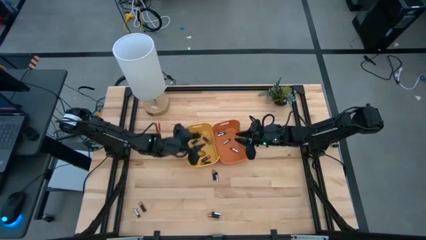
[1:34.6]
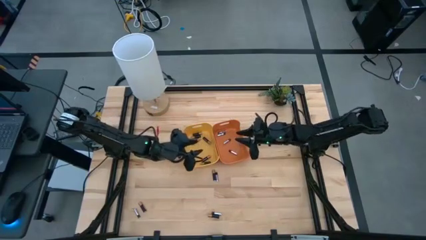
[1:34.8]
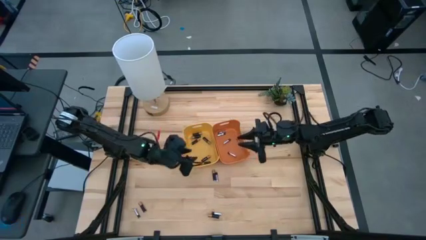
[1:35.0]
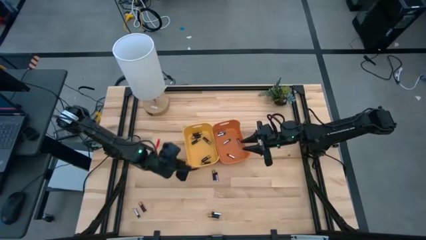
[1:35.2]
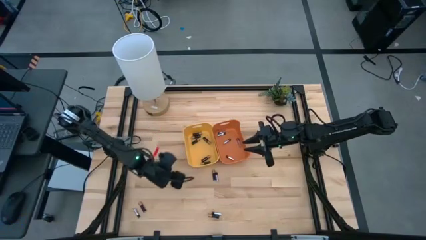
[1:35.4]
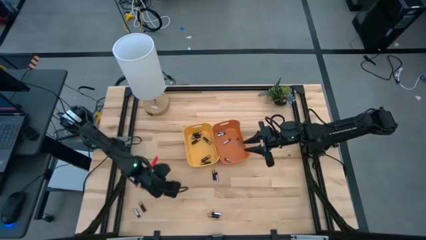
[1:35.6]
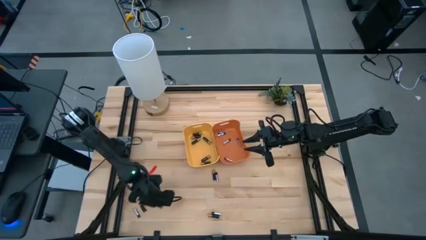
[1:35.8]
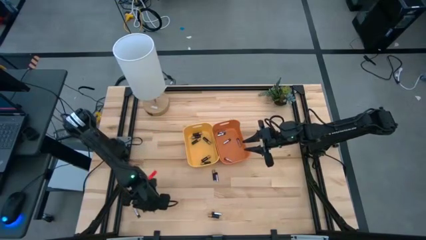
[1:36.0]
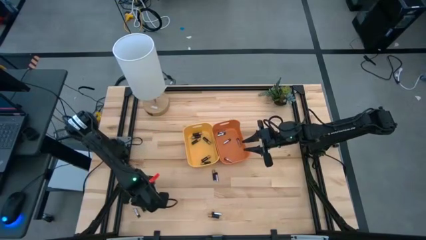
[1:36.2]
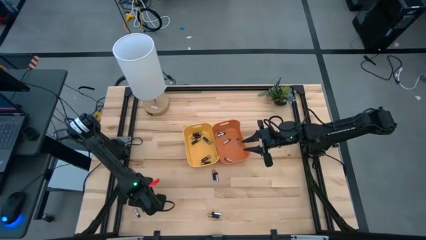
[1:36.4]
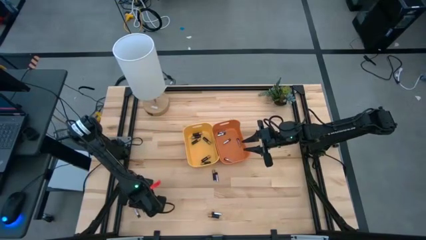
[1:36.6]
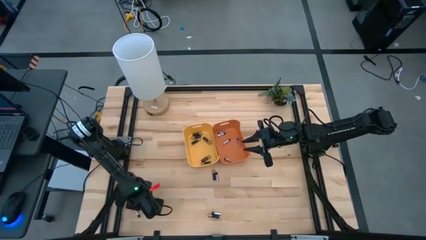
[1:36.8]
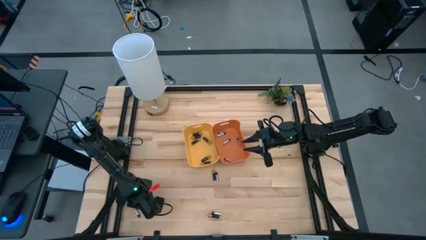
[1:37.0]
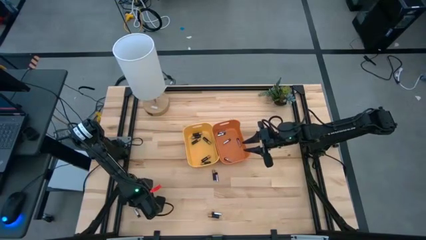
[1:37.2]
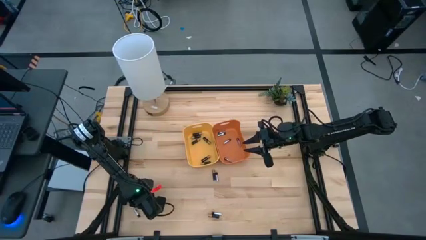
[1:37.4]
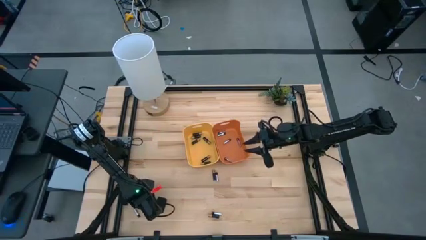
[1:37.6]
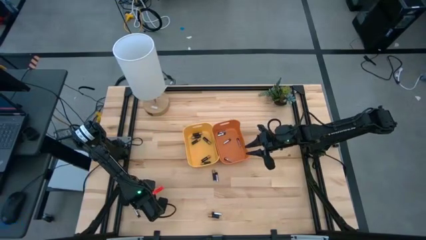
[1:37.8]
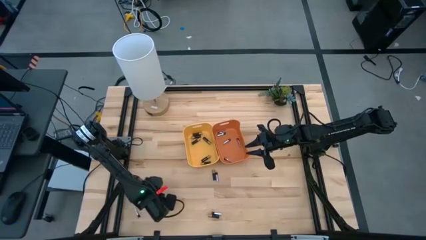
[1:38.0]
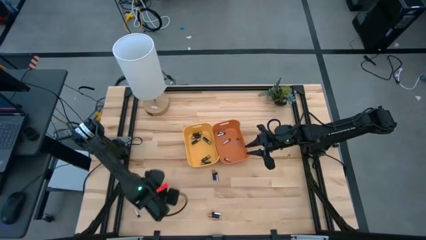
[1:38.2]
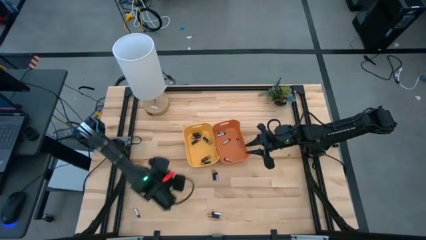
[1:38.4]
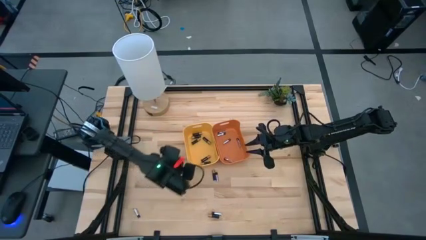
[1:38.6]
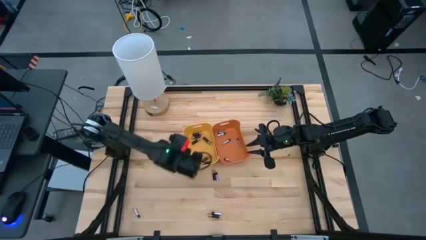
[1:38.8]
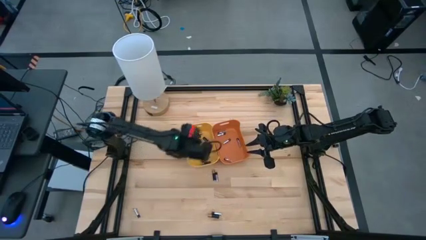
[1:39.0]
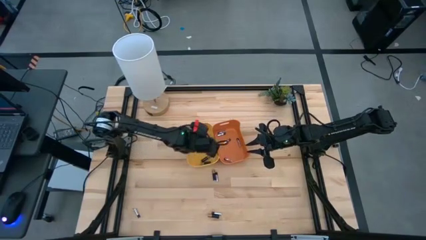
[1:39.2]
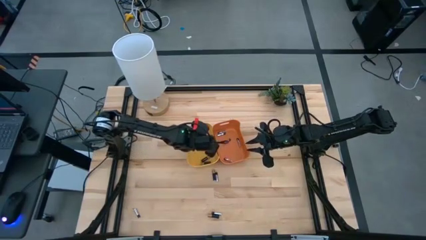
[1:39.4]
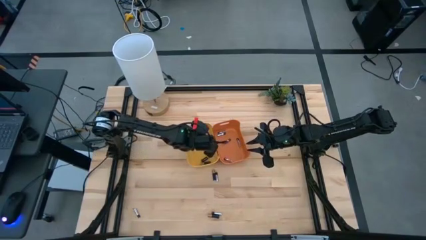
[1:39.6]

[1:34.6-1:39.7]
Task: Sort batteries
Put the bottom left black battery into the yellow bin

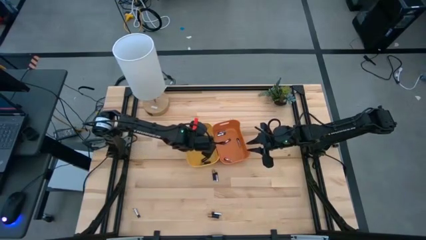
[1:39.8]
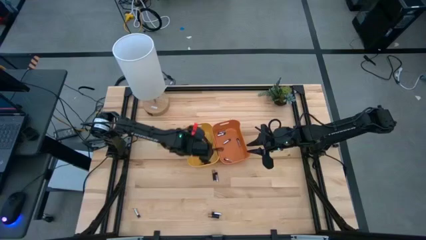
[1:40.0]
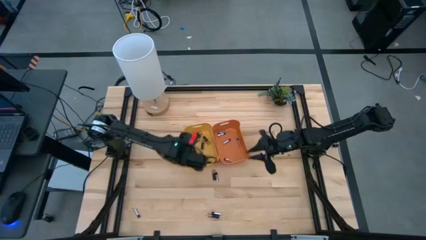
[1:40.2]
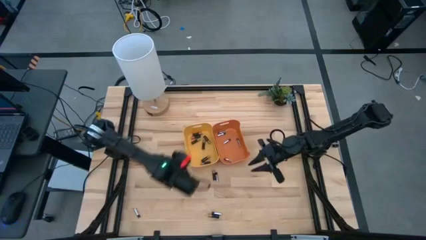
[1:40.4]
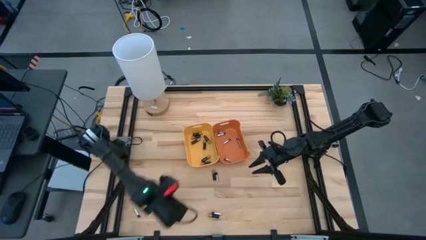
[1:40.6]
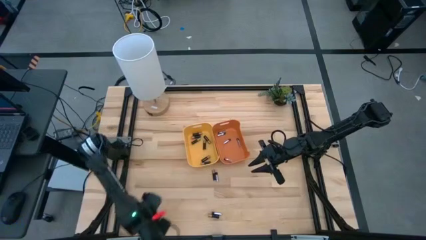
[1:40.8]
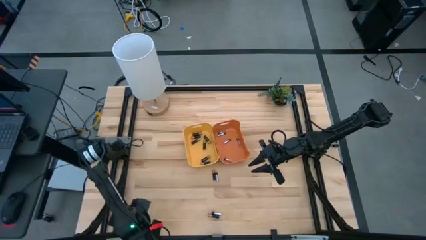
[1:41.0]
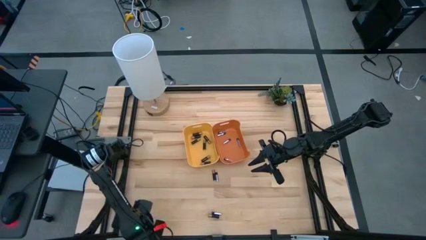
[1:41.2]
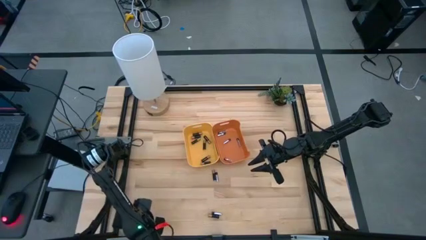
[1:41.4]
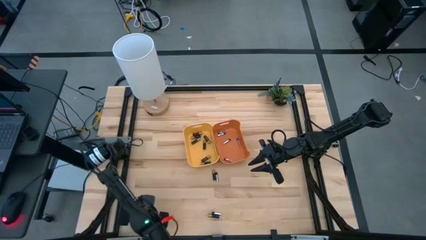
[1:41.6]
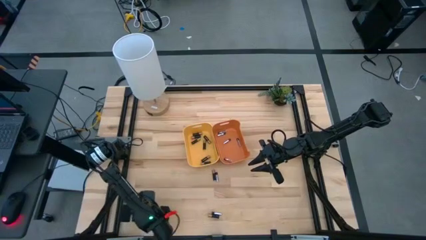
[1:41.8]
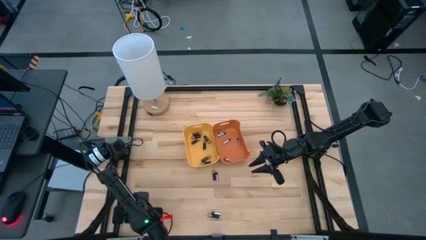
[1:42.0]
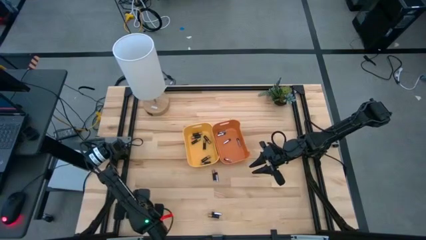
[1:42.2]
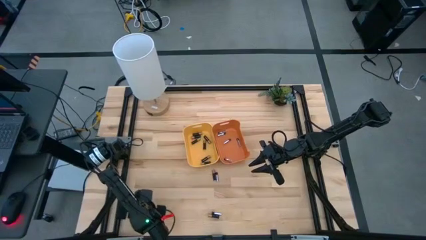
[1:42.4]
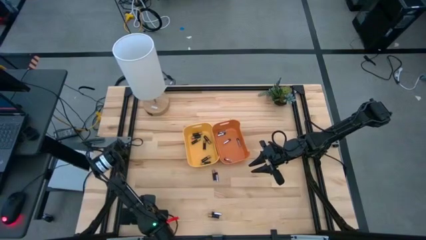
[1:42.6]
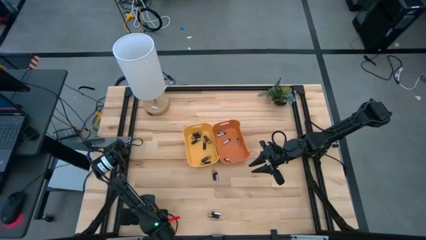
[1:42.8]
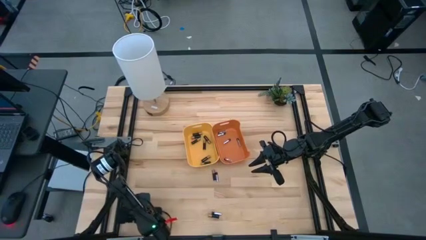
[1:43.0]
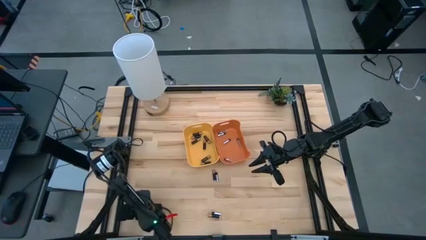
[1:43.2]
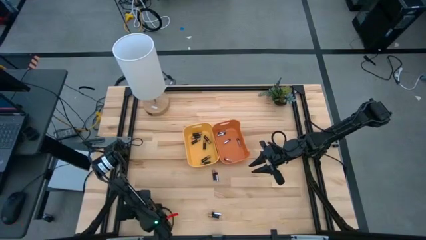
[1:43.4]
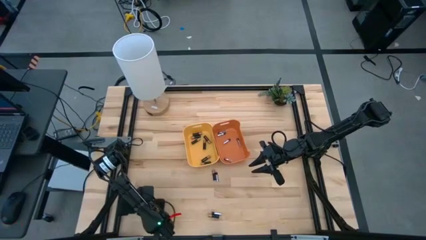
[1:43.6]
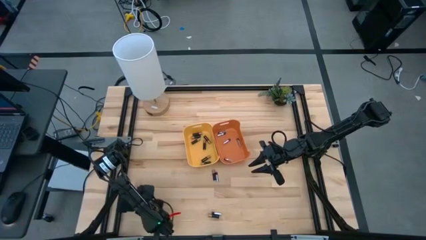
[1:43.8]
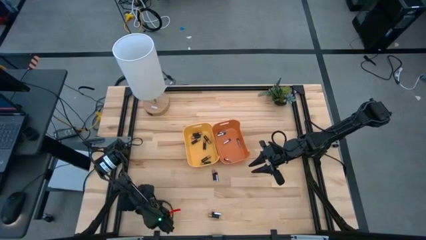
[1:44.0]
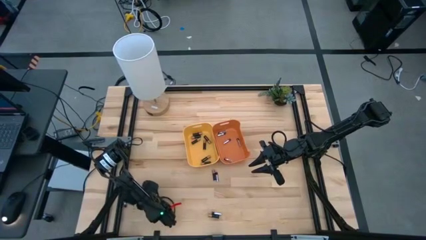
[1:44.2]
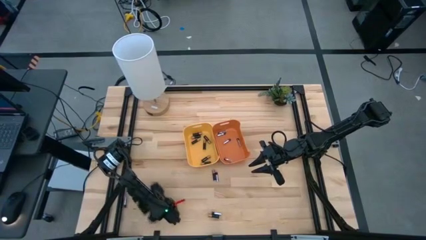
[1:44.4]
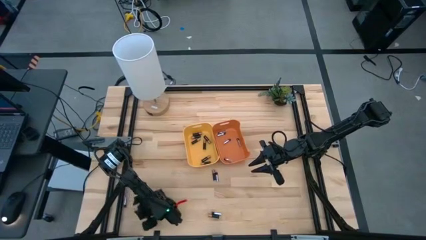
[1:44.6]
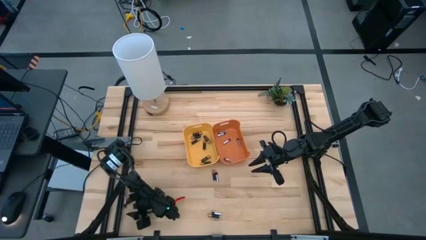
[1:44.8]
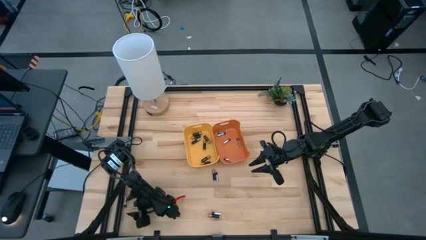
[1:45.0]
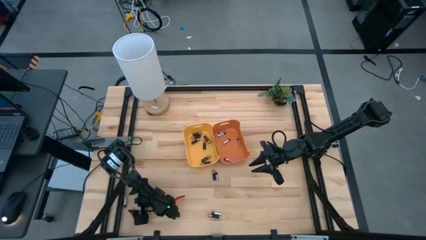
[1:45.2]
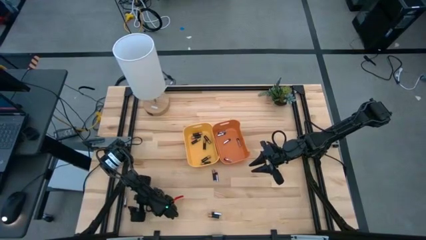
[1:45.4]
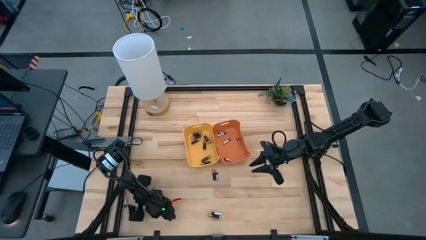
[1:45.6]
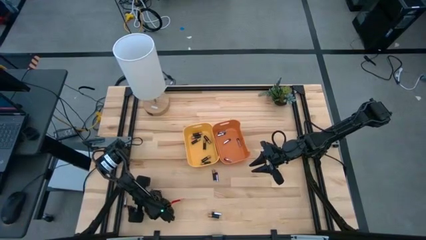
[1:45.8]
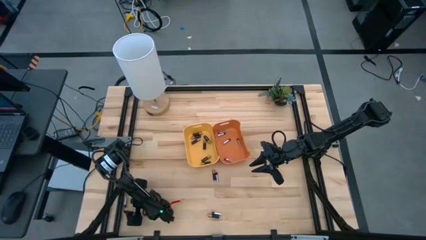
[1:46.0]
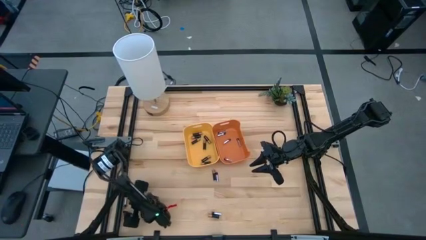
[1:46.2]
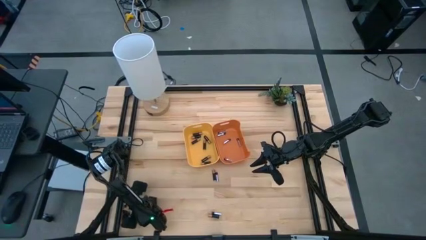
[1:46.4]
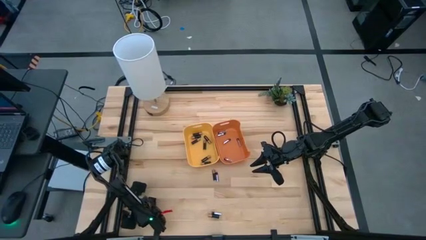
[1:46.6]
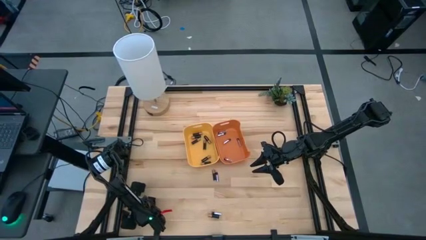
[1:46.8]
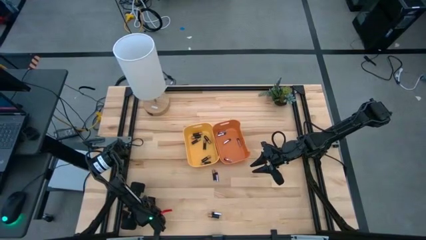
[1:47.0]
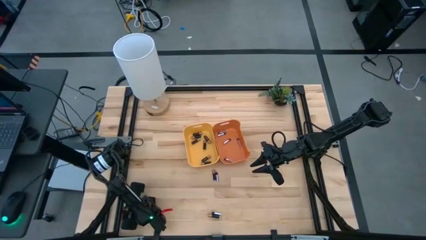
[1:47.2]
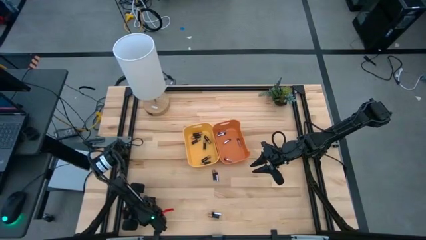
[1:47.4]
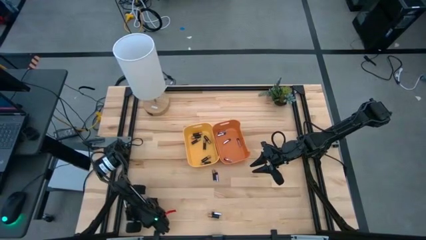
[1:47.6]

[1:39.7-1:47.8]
Put the bottom left silver battery into the orange bin
